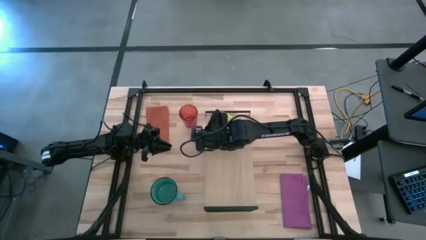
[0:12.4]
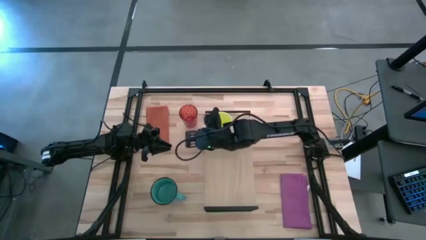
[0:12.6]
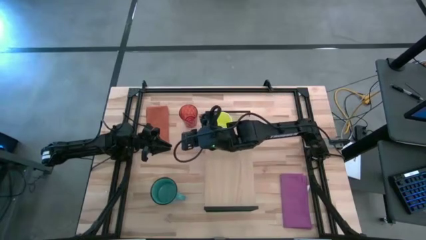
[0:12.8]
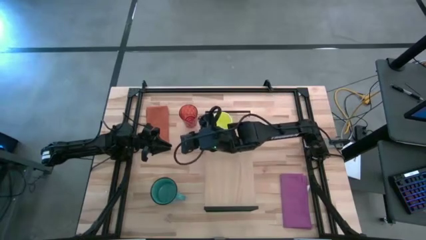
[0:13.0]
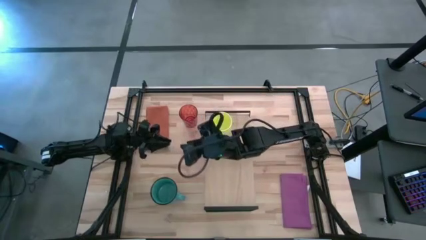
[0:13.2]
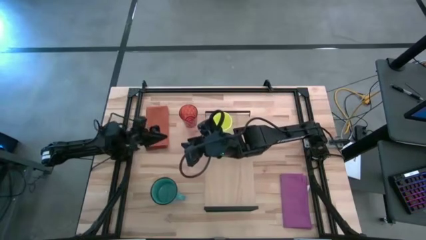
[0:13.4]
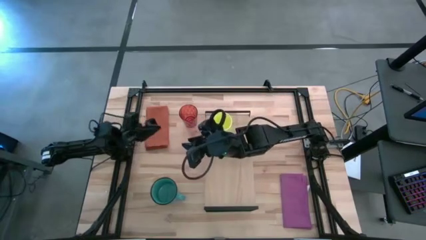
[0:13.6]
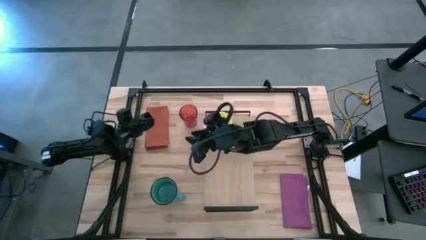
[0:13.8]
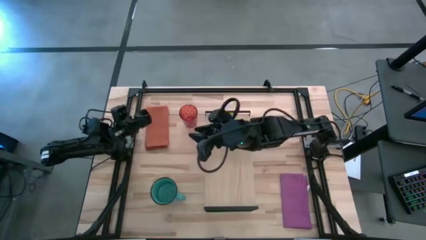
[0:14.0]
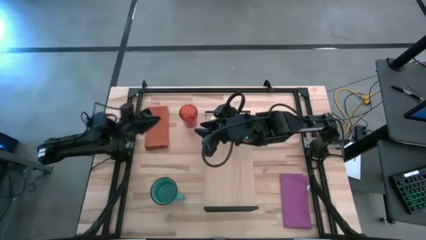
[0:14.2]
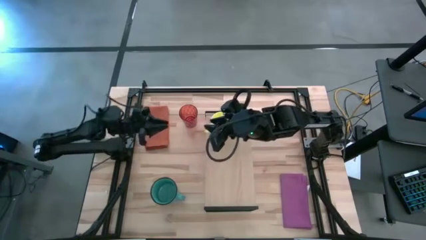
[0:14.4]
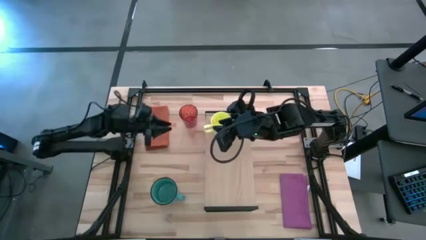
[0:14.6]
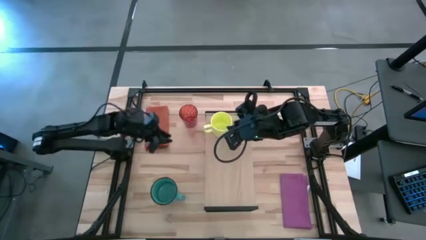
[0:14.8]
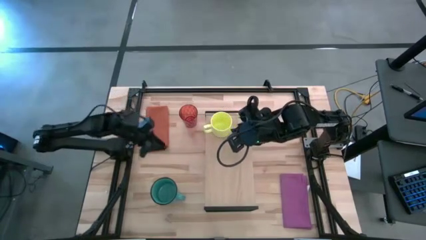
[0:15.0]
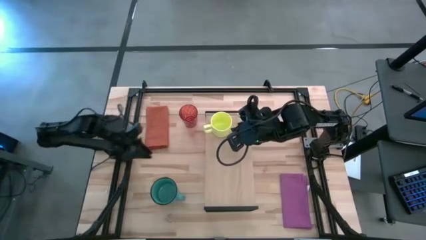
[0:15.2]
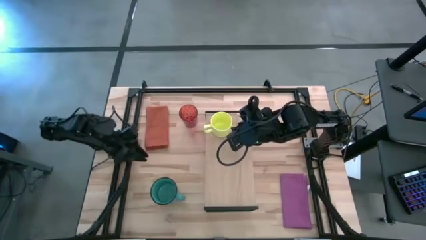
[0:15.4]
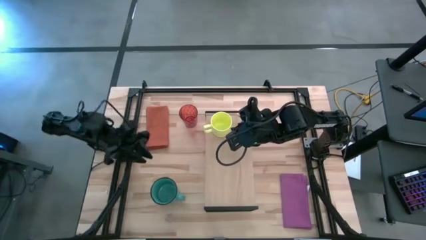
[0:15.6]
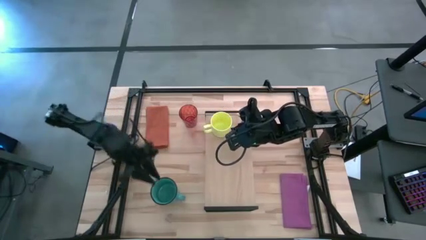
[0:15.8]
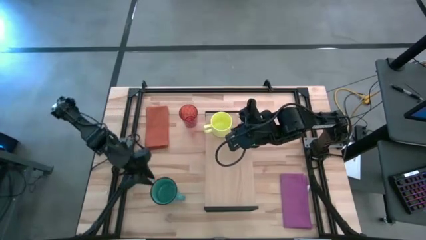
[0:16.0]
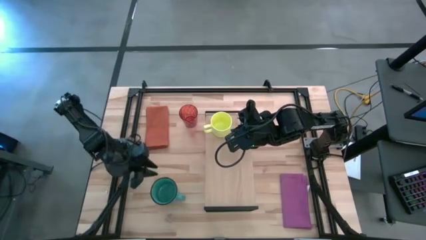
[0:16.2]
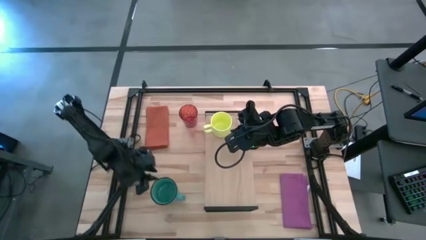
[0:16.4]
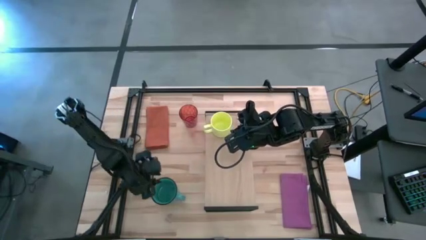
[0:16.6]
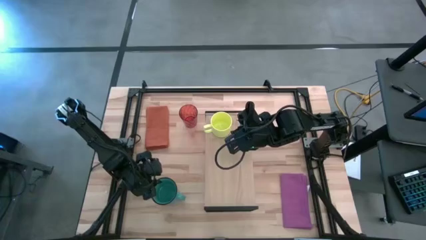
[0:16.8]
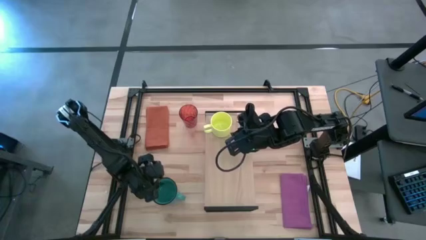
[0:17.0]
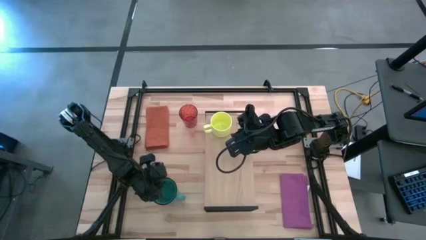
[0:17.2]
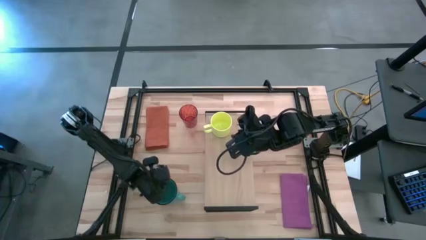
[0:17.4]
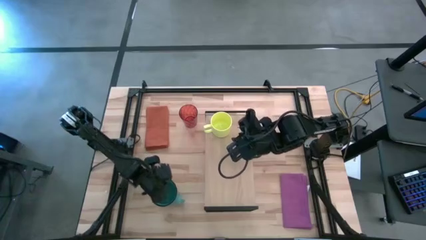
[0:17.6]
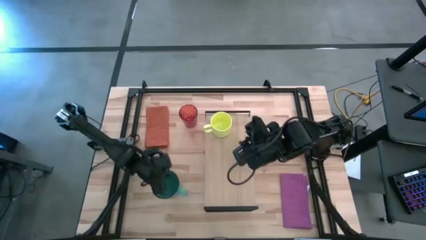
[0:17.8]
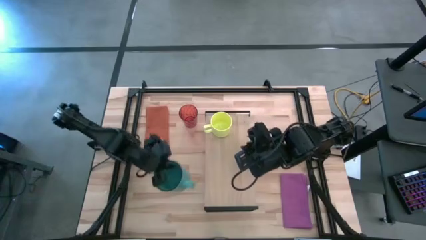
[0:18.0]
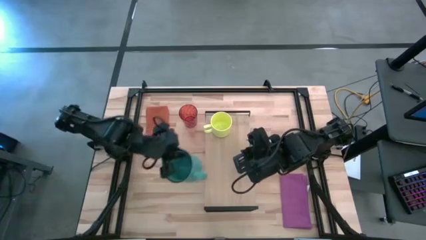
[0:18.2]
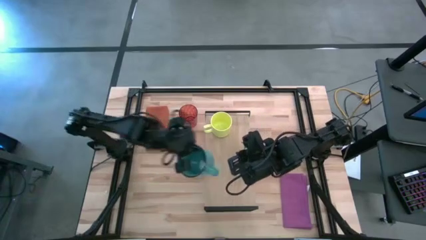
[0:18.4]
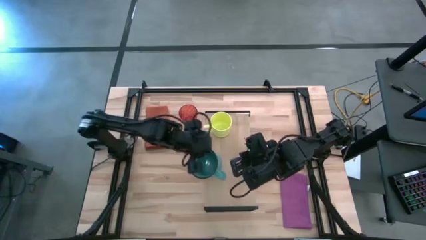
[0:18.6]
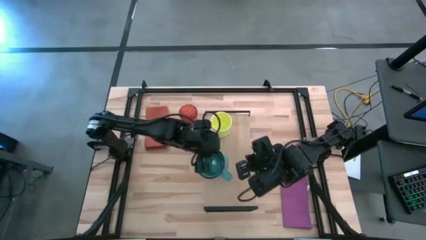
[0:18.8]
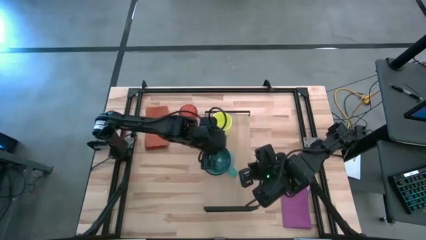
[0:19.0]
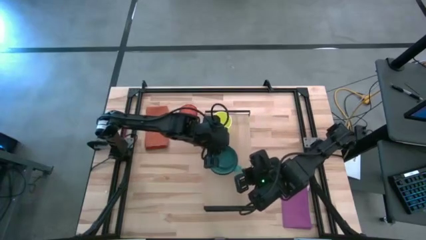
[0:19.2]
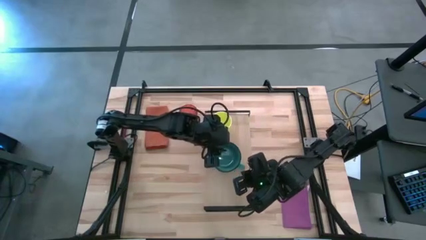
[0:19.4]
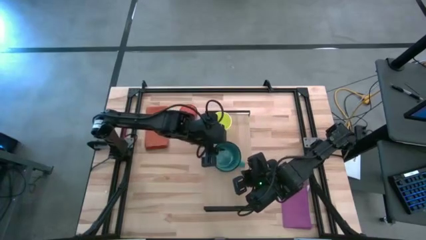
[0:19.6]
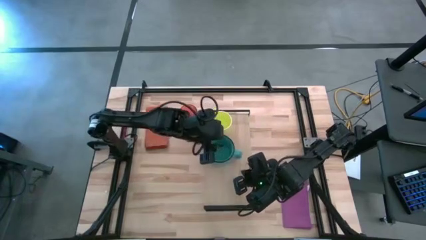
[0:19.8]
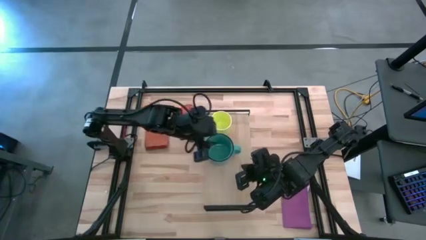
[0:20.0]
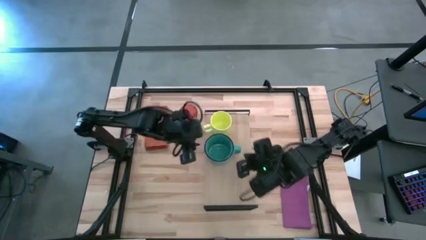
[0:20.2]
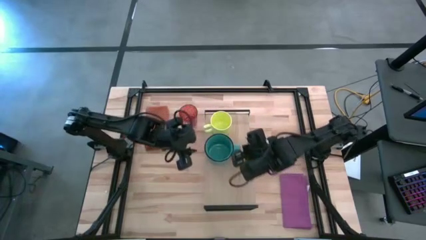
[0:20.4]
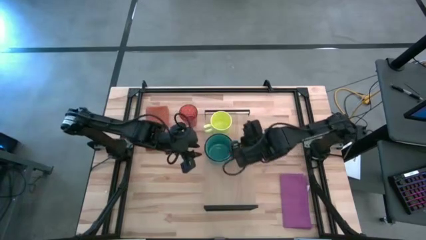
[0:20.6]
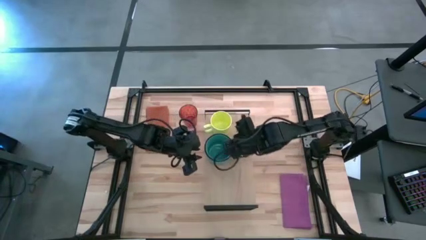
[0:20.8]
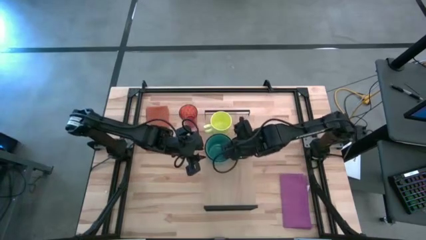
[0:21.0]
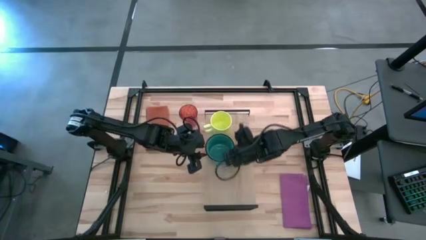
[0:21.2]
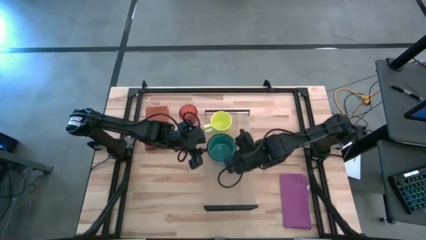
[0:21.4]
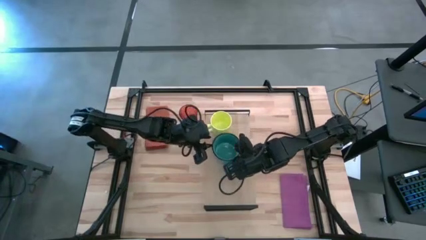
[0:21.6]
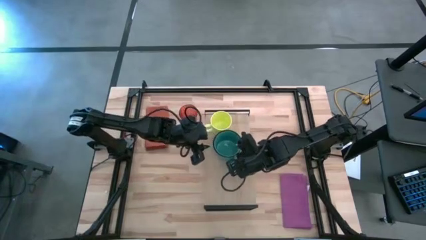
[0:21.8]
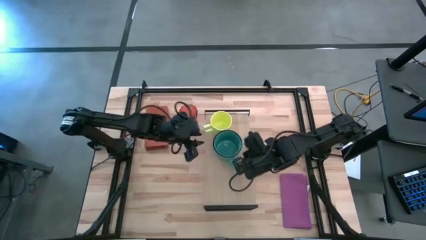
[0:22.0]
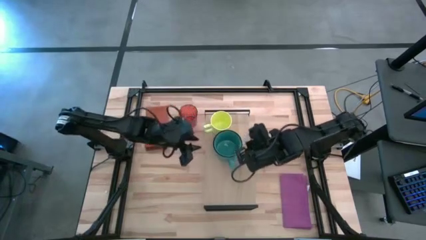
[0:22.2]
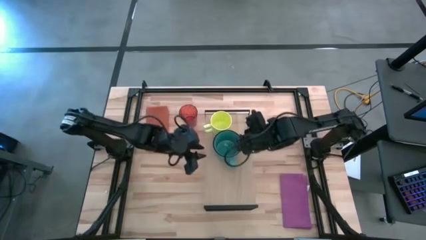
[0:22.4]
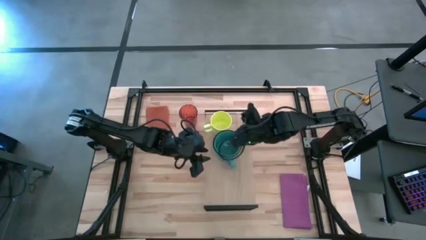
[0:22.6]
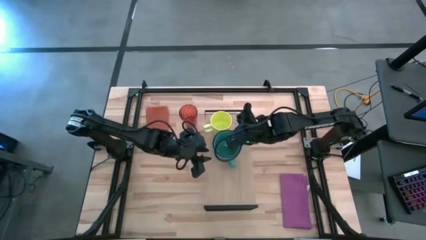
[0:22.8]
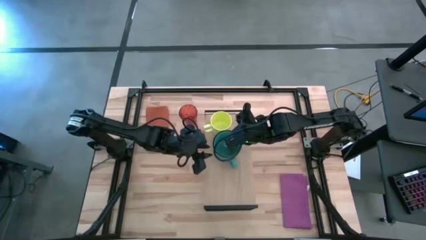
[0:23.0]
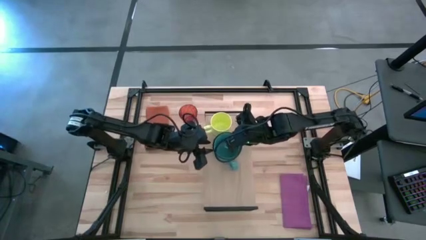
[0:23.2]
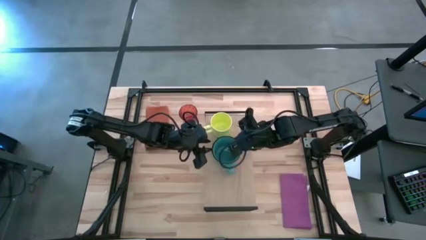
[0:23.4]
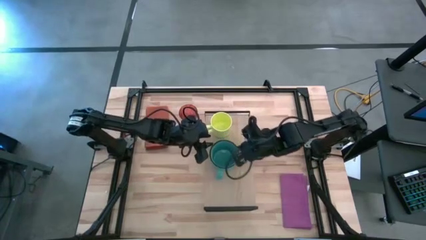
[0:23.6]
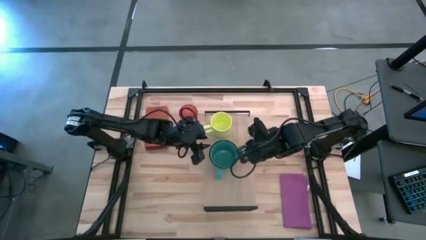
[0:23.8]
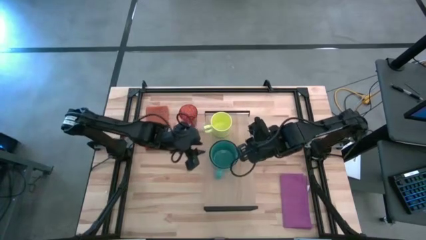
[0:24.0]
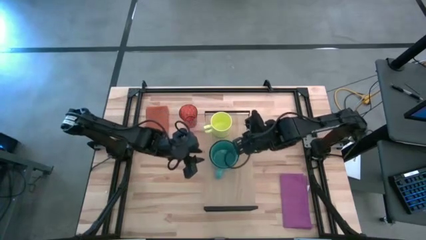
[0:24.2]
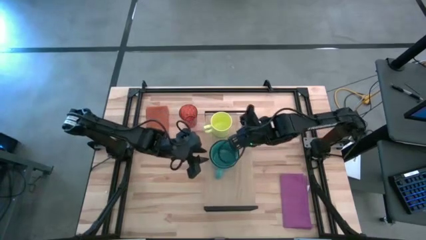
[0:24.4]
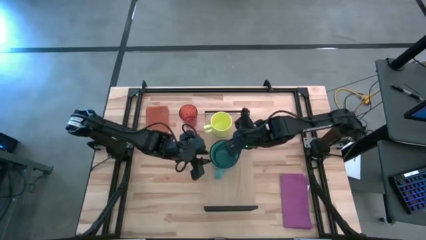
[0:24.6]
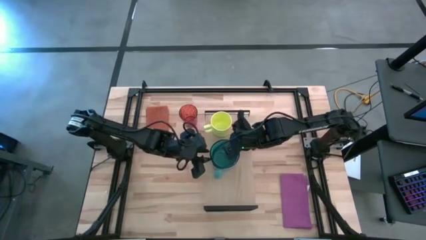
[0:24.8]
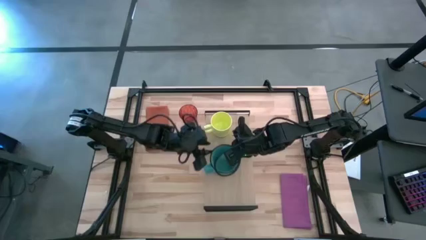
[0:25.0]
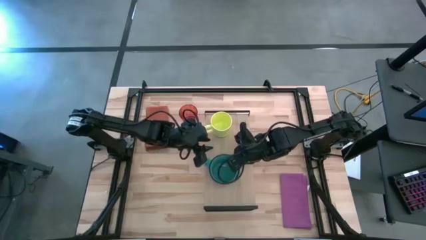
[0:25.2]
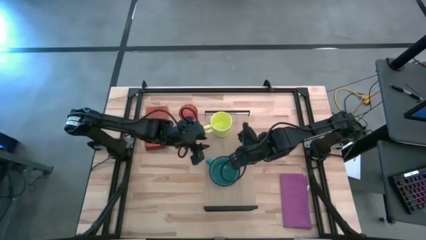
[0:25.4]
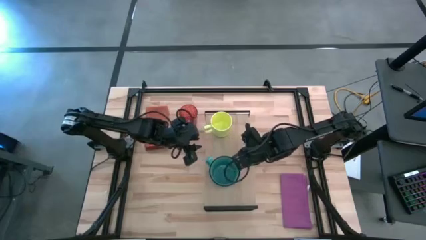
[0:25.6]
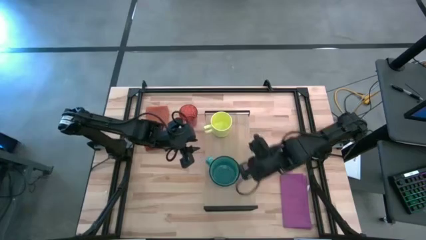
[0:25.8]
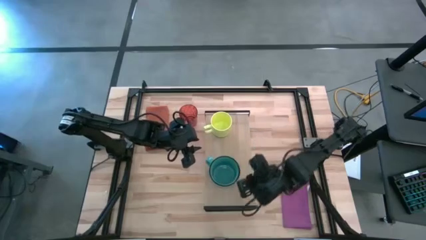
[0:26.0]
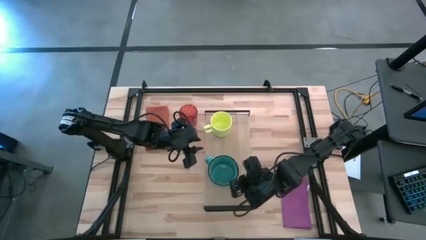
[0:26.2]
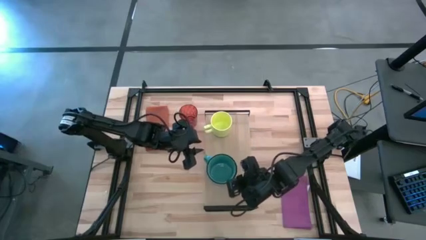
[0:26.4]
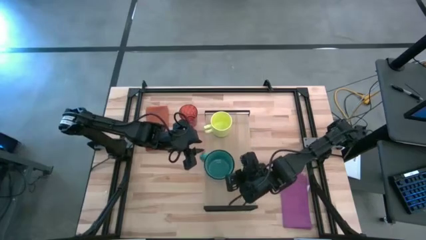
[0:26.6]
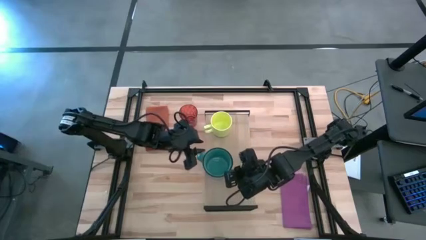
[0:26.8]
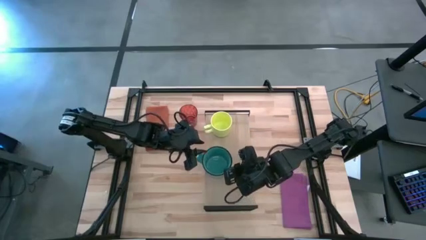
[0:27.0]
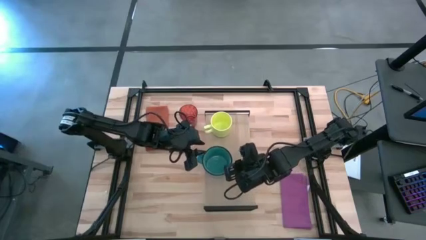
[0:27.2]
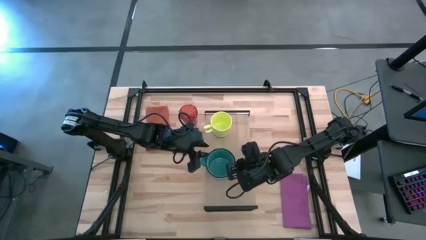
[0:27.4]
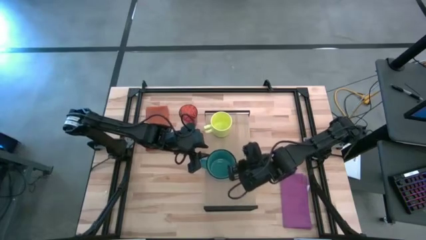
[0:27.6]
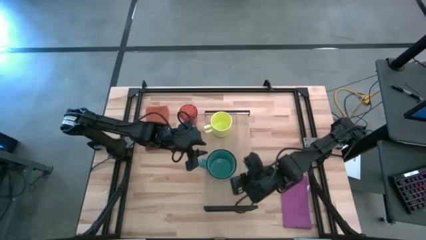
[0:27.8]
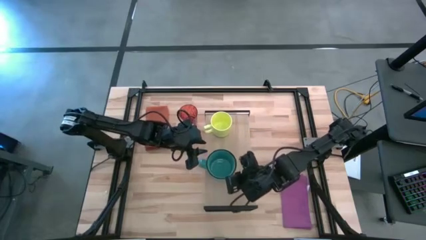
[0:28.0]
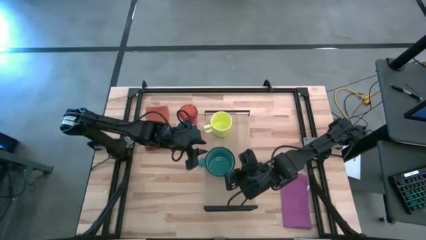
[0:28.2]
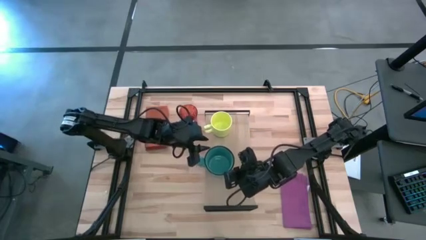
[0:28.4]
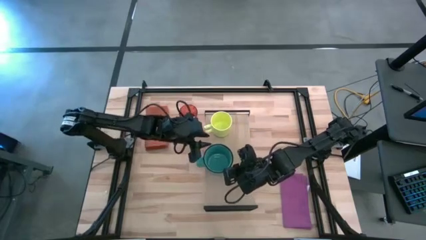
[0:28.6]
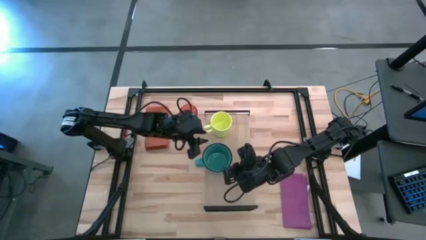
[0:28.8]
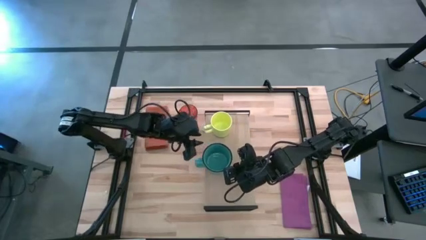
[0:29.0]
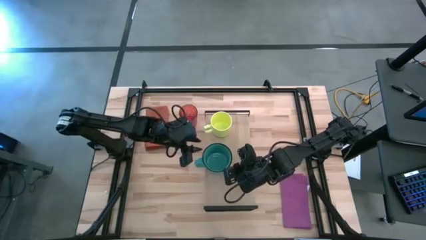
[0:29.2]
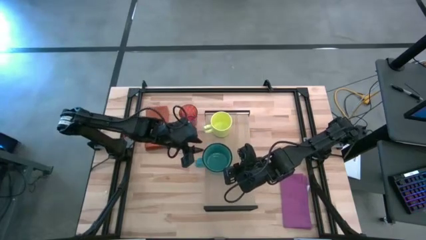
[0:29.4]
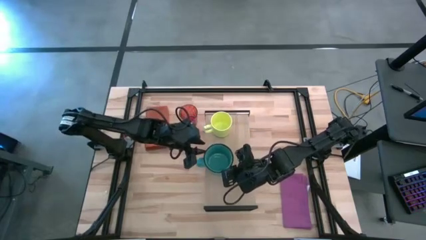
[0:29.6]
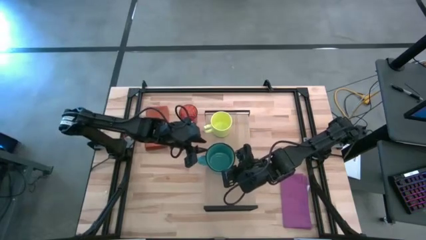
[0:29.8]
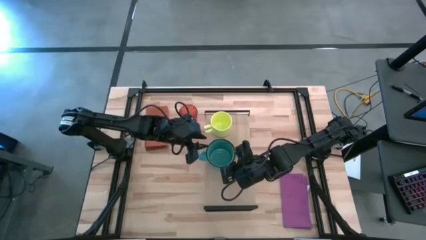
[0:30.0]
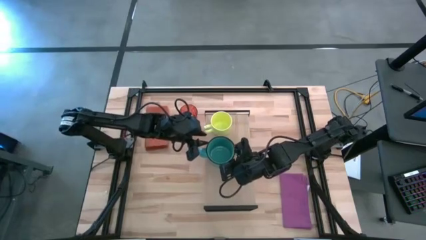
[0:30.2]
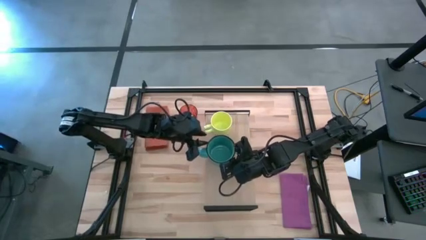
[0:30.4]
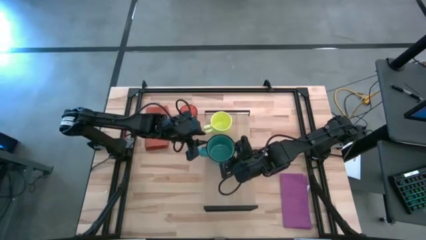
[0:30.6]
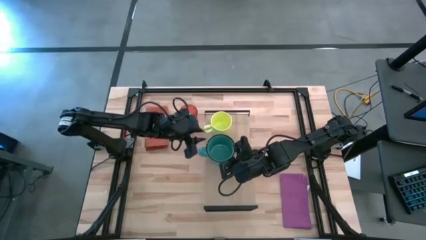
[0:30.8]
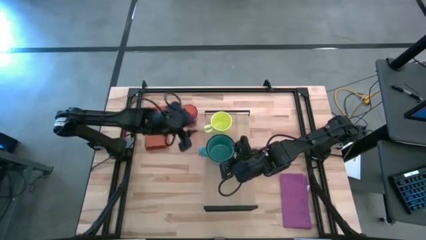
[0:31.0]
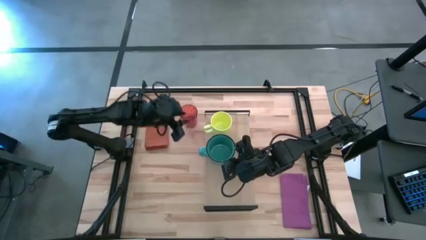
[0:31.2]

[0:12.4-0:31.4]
Task: Stack small to large cups/mugs on shelf
Put the blue mug on the shelf
